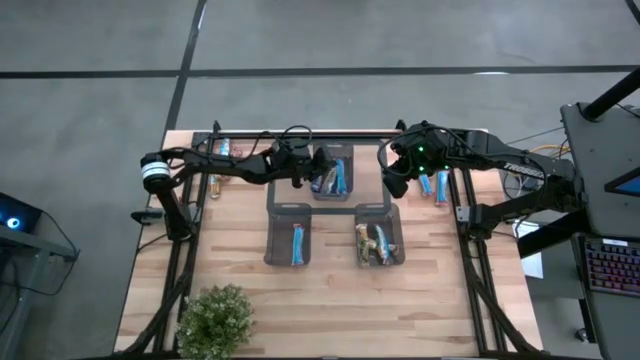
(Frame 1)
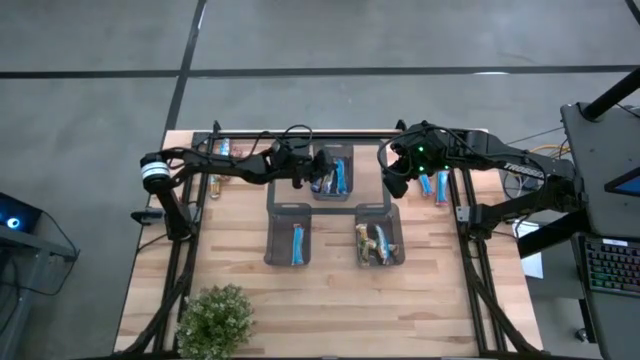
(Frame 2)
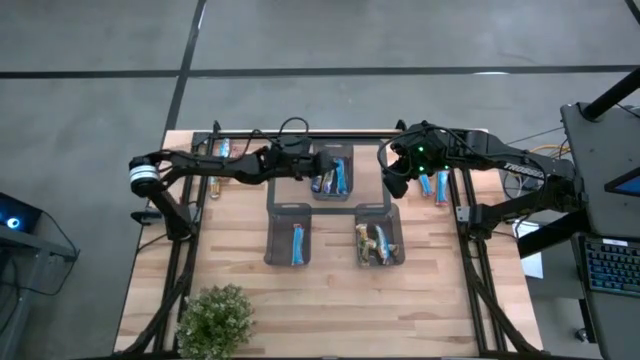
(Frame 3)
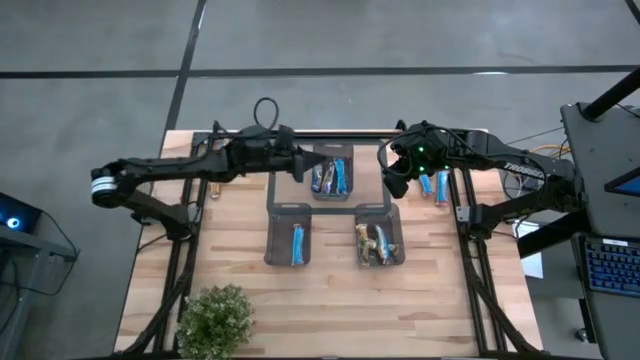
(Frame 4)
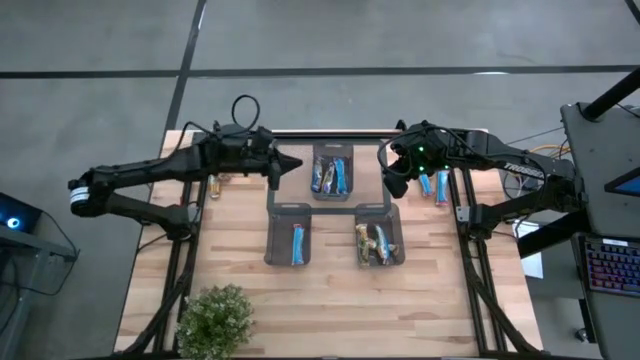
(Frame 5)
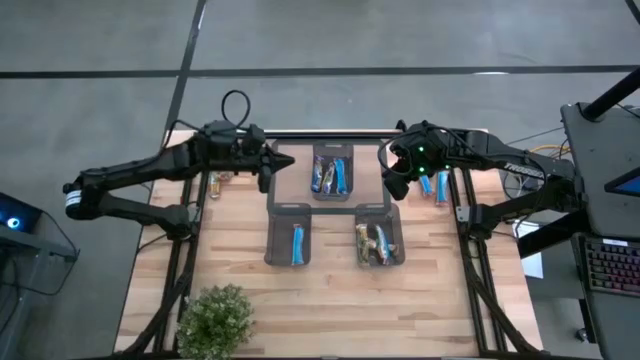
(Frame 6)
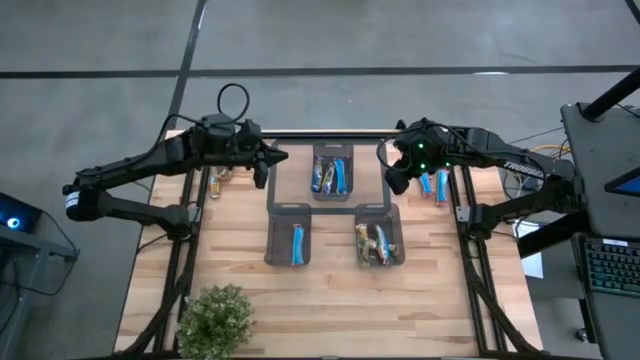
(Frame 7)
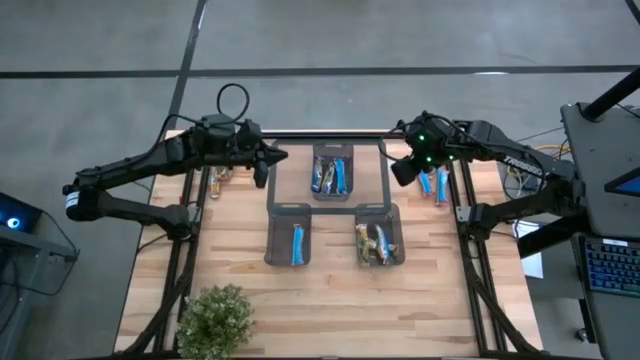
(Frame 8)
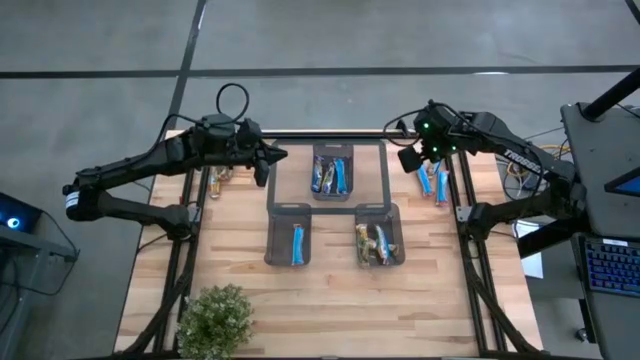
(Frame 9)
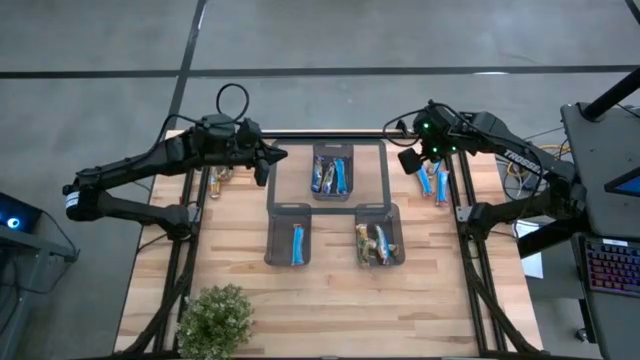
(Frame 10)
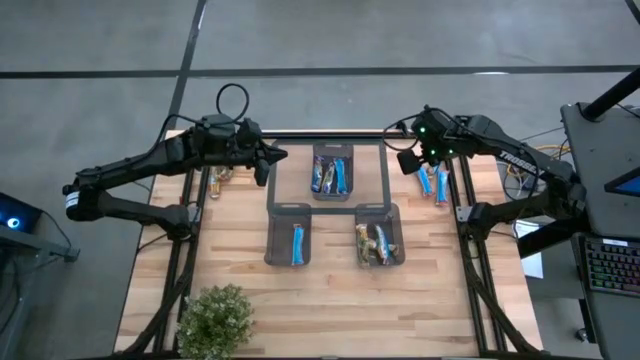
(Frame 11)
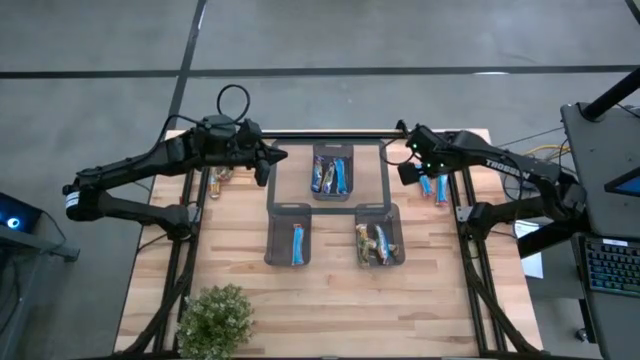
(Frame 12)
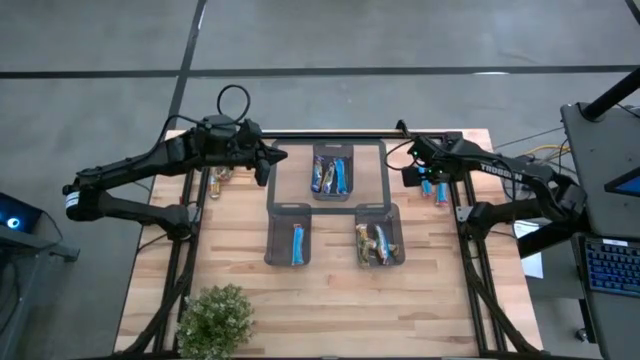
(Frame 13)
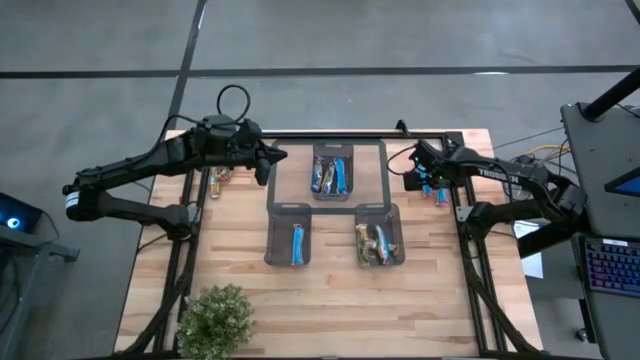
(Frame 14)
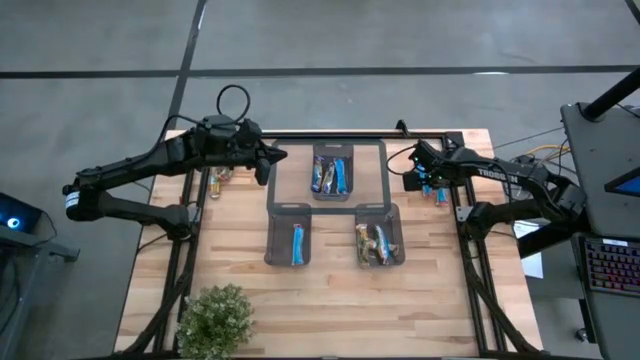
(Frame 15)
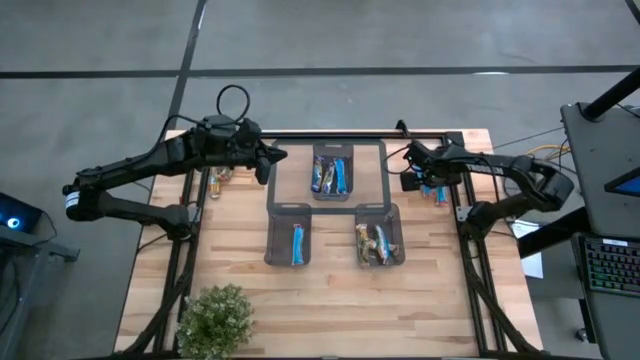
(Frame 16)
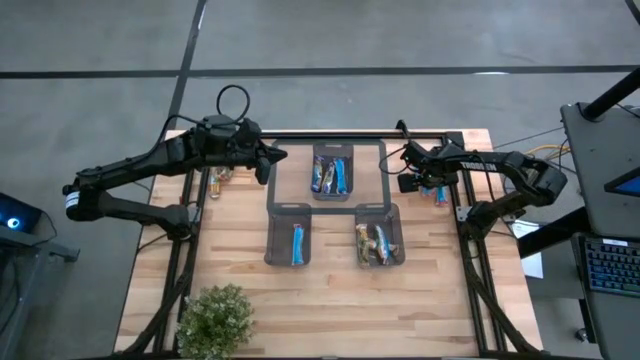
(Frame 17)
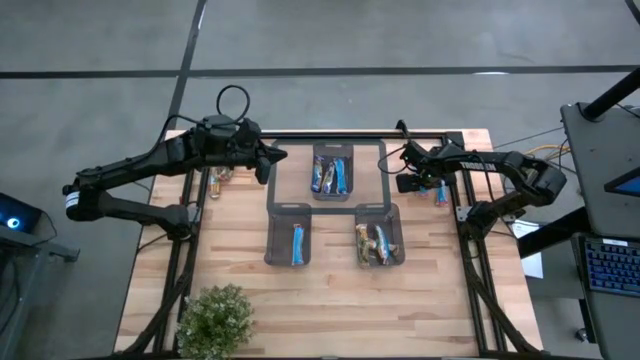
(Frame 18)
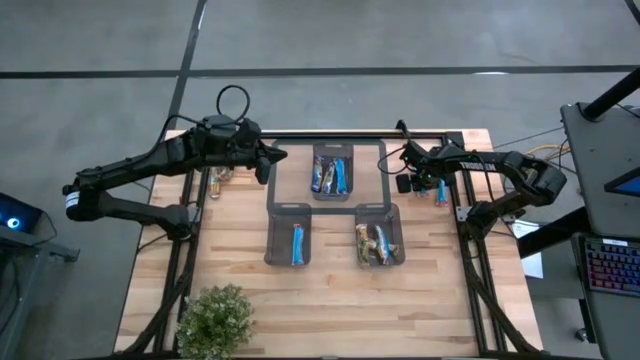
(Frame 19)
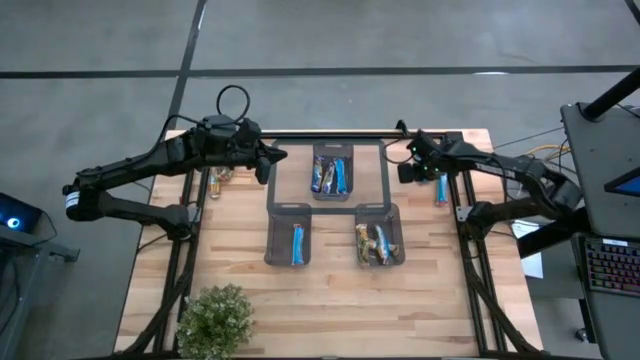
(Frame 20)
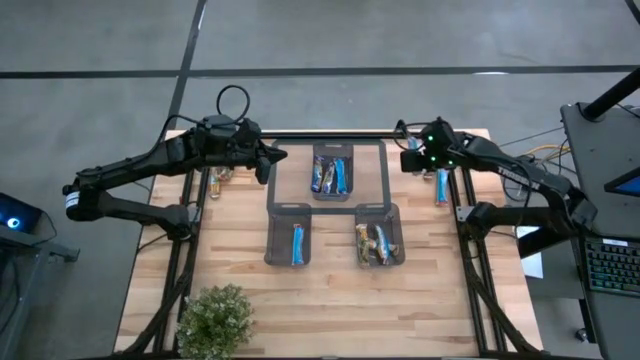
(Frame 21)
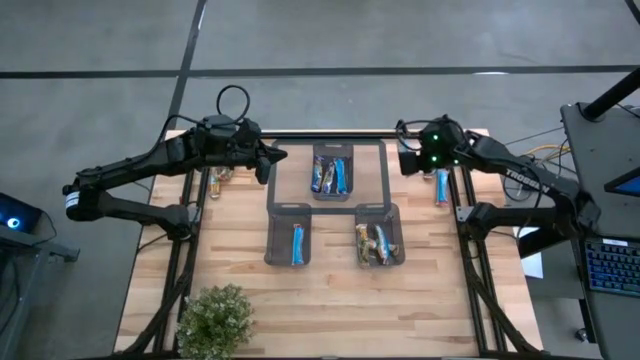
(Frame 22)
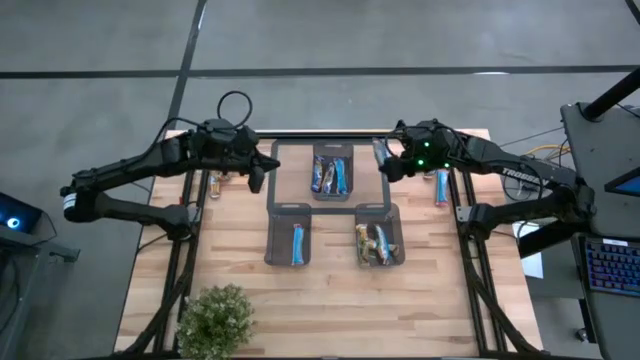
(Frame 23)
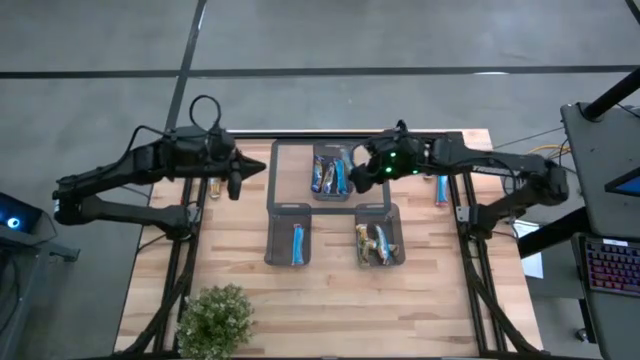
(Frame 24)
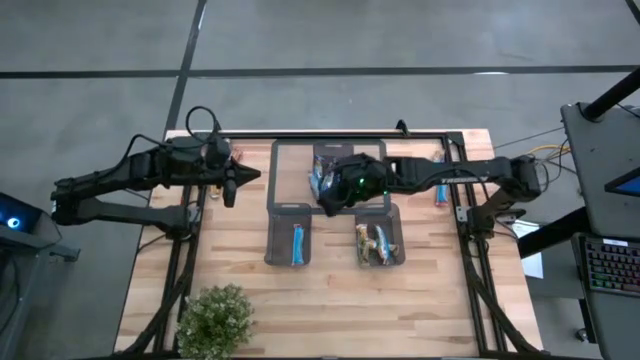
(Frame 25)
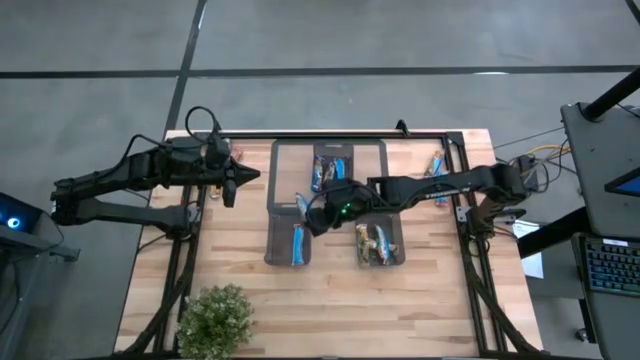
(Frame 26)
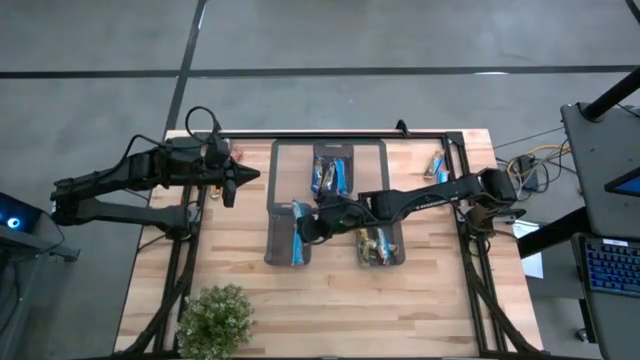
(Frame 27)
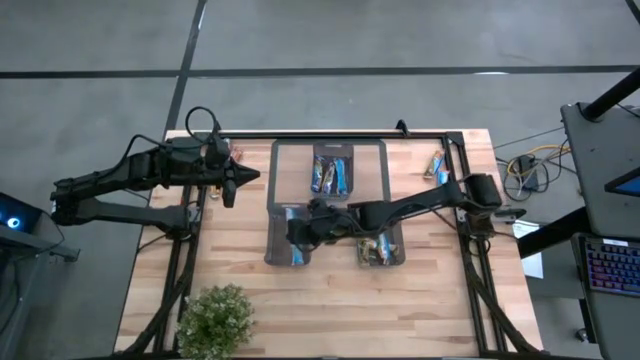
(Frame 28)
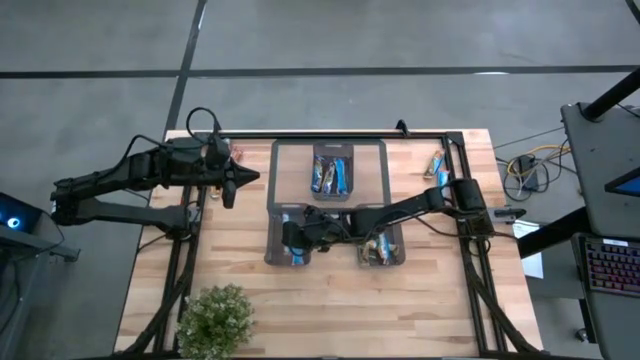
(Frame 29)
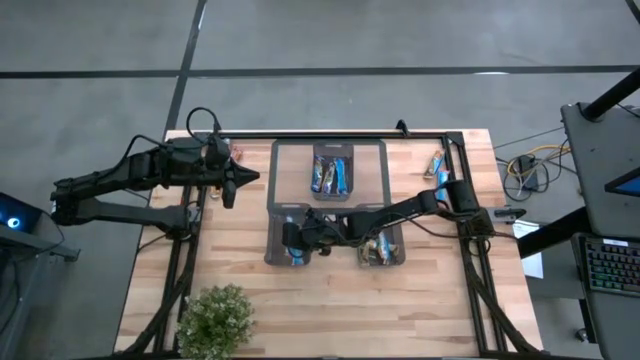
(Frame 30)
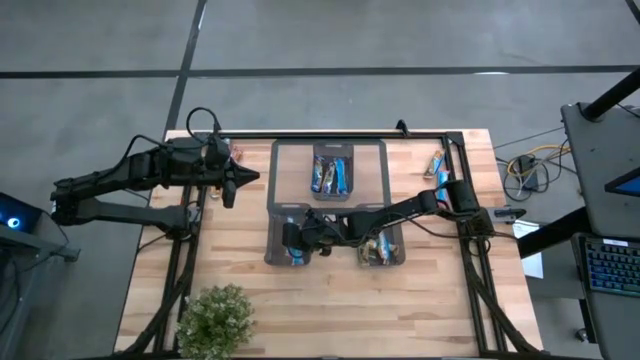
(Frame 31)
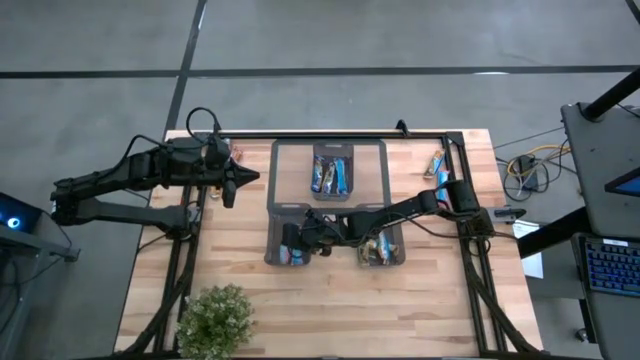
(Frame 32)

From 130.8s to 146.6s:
Task: Pick and place Granola Bars by type
Put the red granola bar into the bottom left black bin

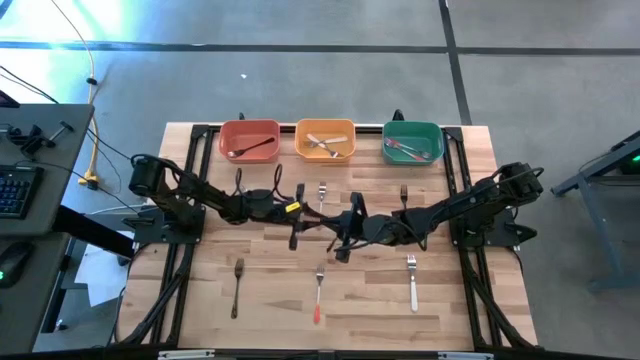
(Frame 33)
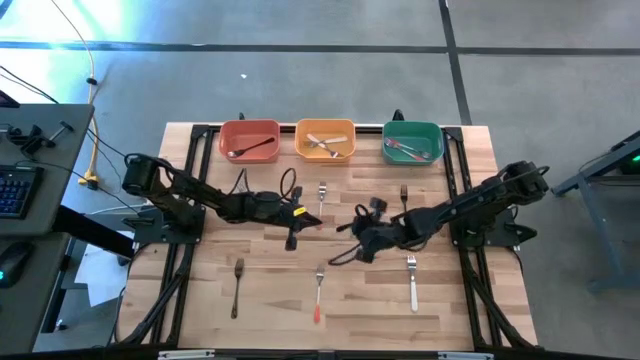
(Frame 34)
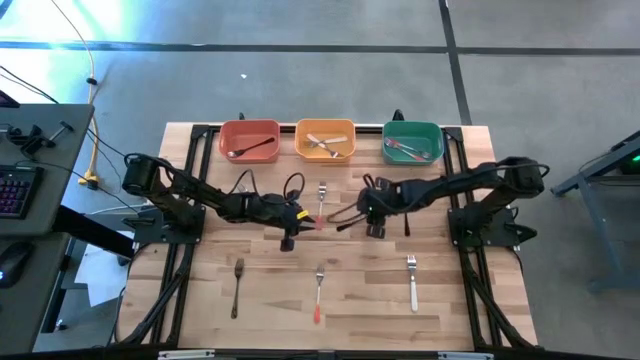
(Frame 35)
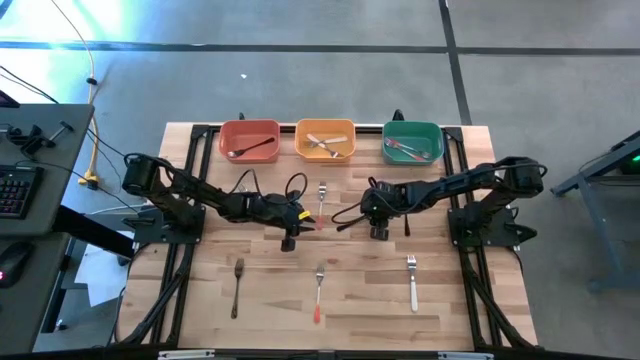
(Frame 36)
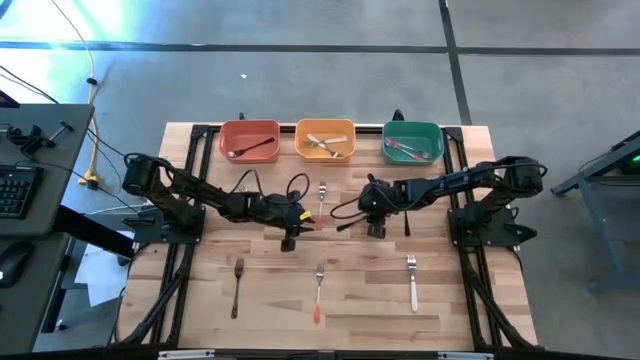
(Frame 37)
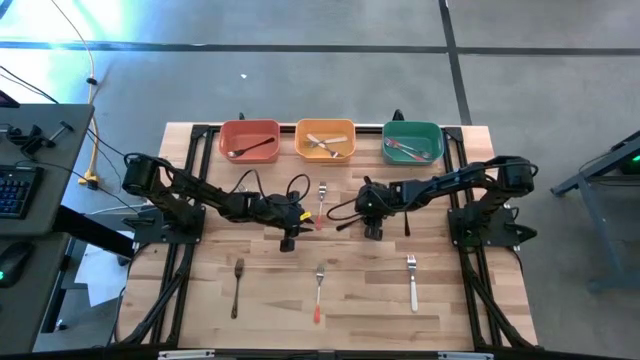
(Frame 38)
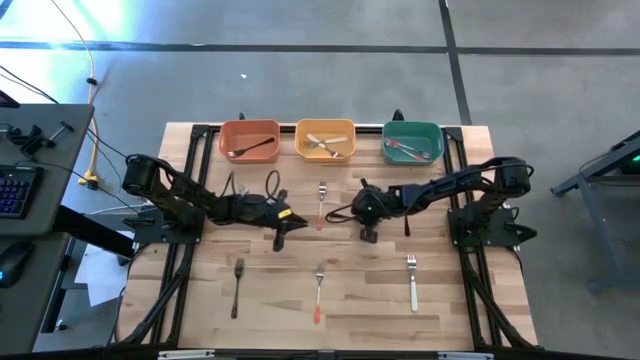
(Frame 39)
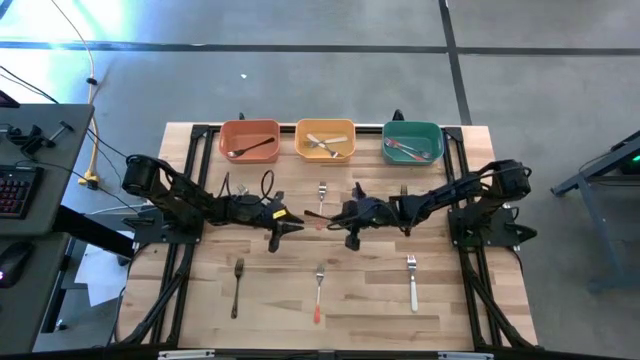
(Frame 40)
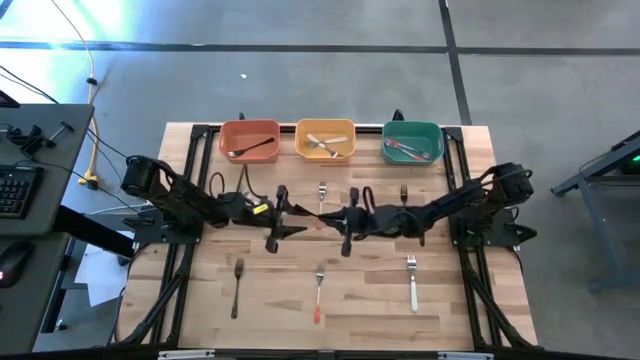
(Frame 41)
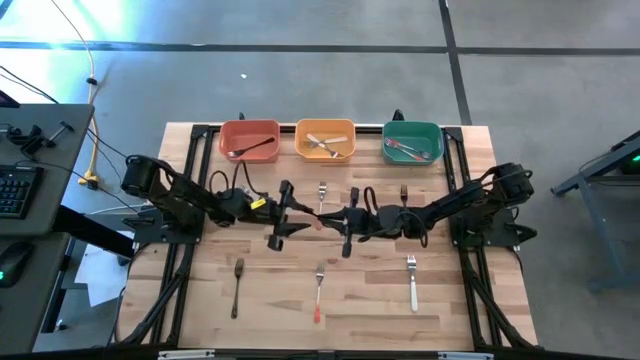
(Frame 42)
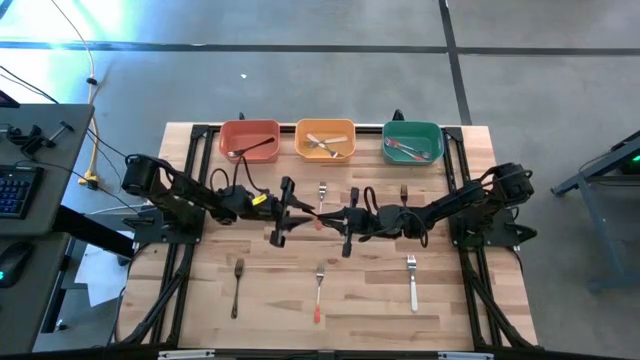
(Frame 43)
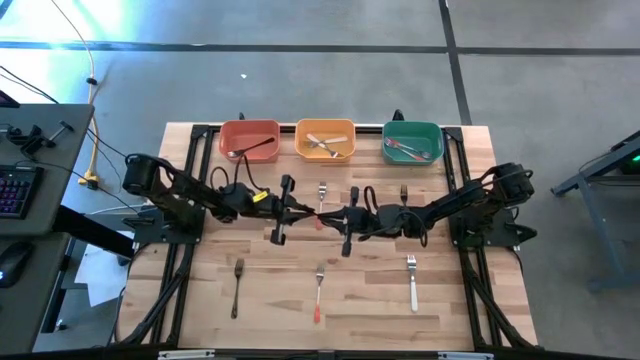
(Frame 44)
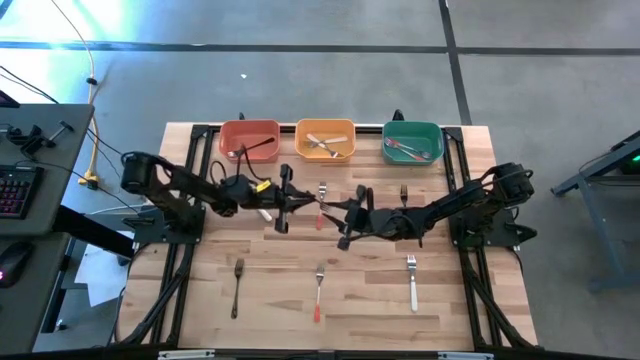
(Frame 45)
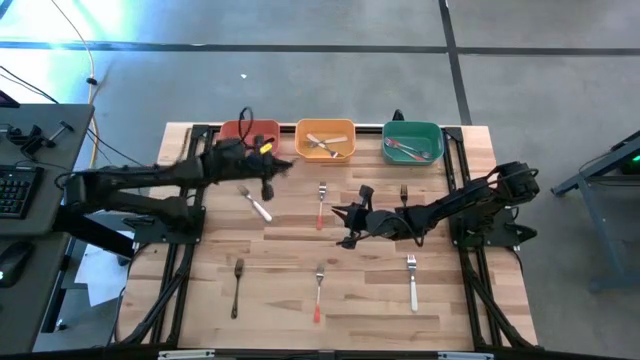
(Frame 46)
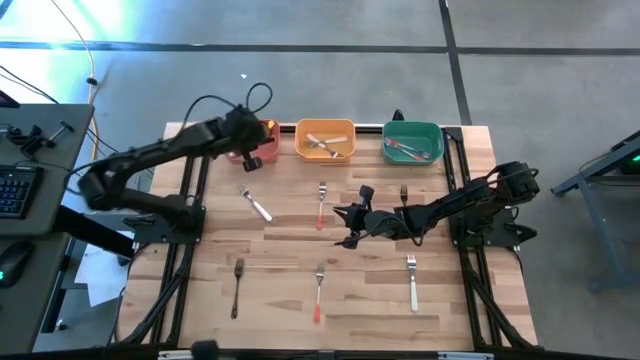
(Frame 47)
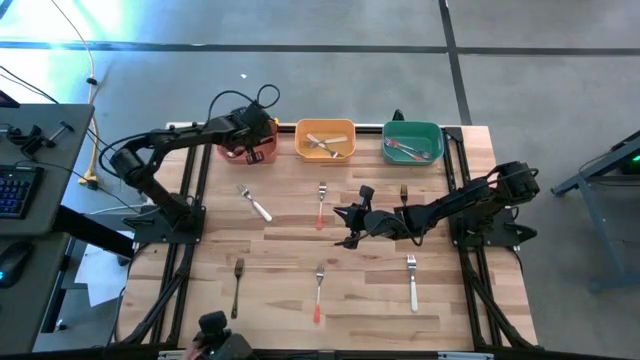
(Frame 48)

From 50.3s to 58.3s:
Task: Sort silverware by color (type)
Put the top left black fork into the orange bin
